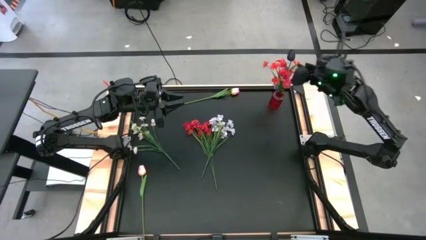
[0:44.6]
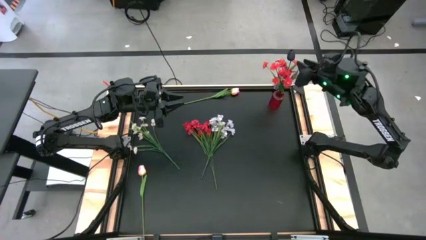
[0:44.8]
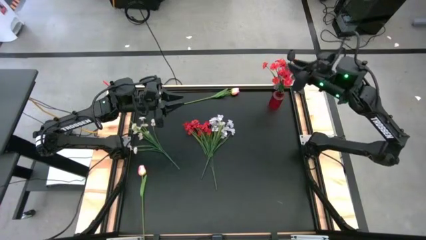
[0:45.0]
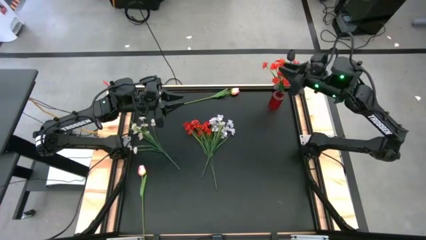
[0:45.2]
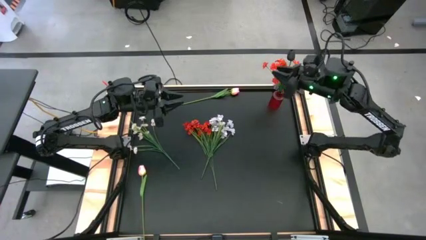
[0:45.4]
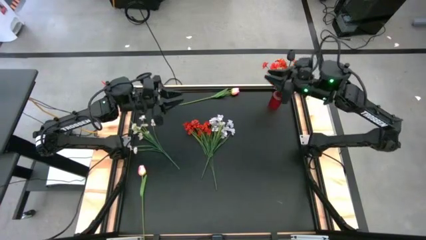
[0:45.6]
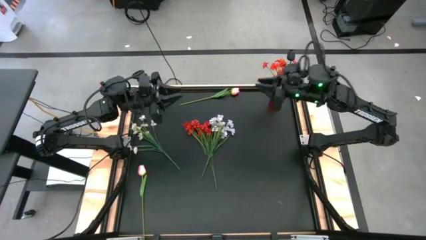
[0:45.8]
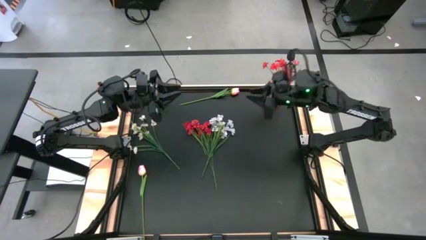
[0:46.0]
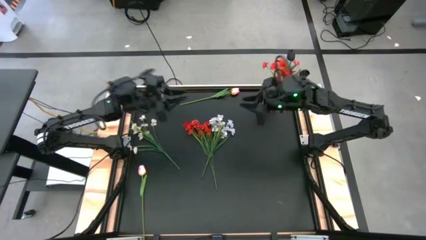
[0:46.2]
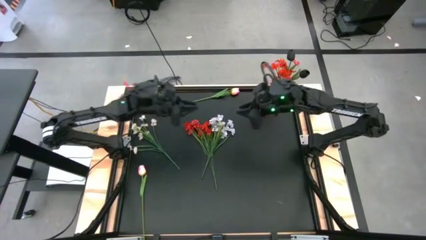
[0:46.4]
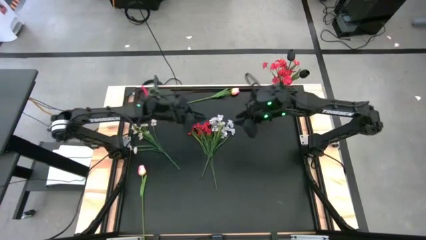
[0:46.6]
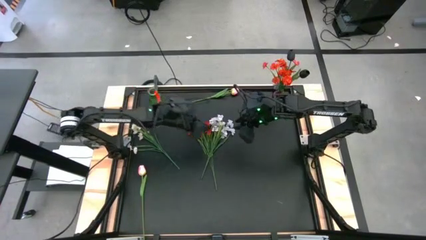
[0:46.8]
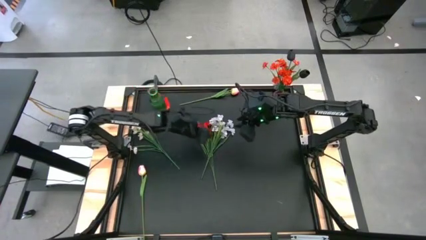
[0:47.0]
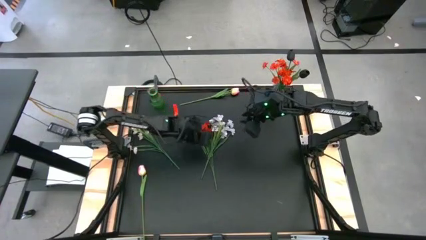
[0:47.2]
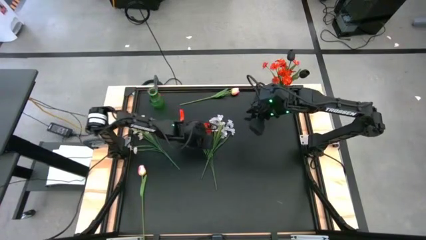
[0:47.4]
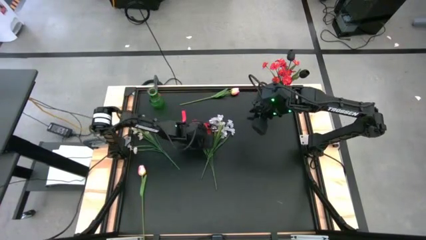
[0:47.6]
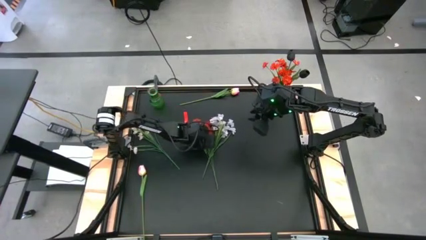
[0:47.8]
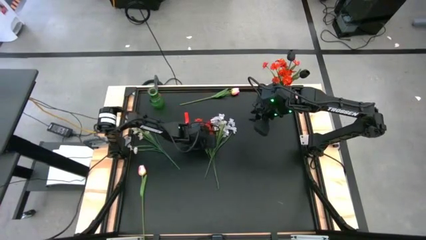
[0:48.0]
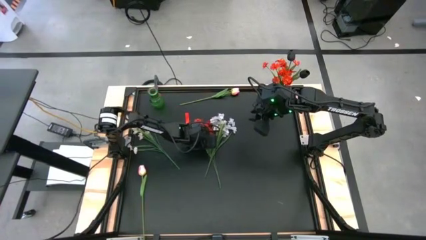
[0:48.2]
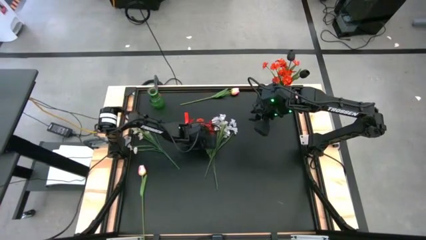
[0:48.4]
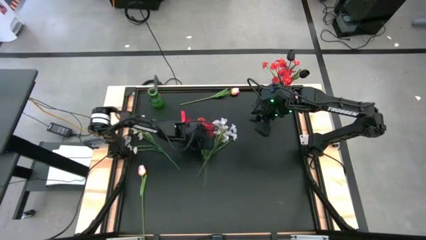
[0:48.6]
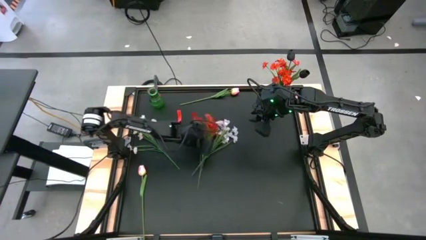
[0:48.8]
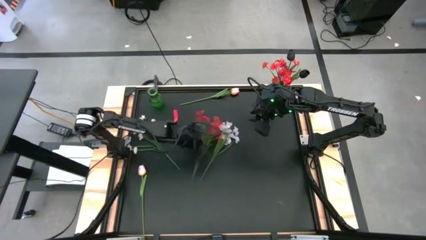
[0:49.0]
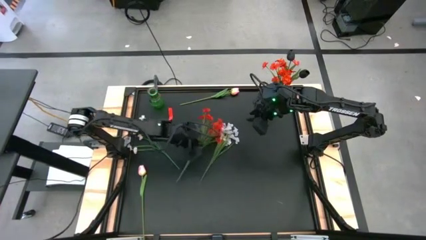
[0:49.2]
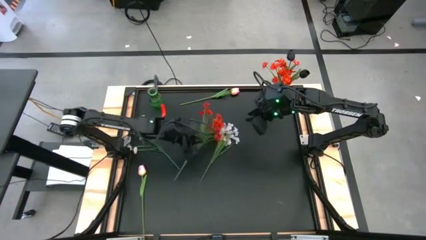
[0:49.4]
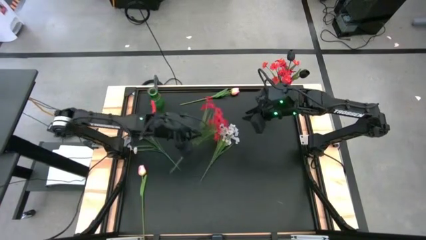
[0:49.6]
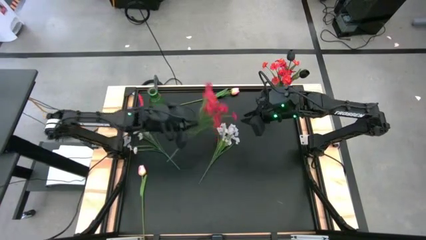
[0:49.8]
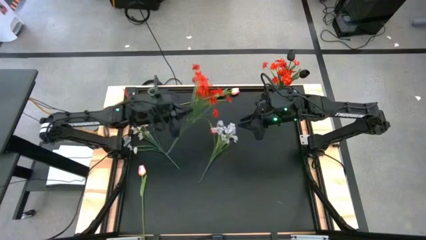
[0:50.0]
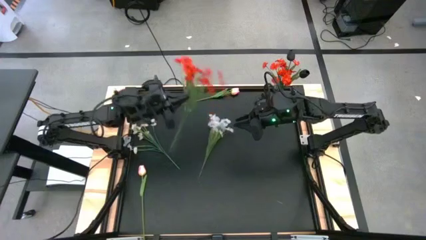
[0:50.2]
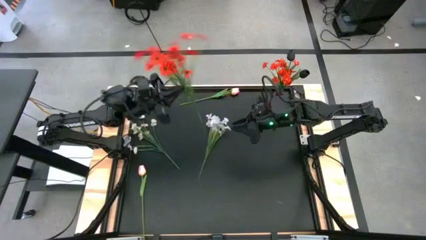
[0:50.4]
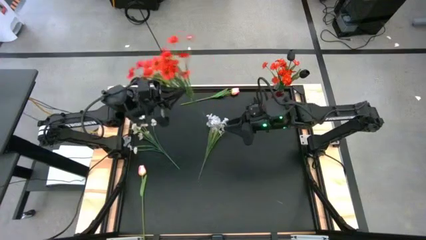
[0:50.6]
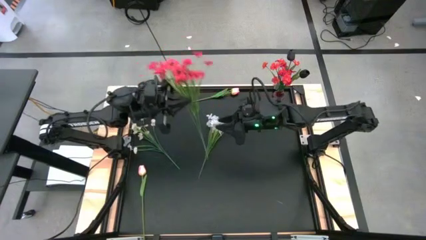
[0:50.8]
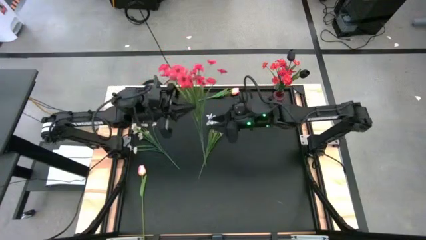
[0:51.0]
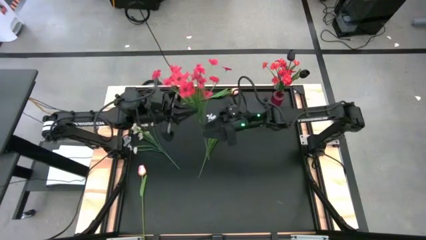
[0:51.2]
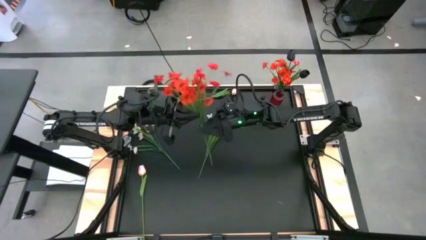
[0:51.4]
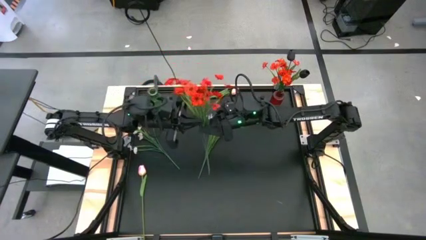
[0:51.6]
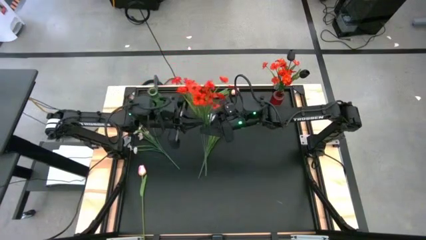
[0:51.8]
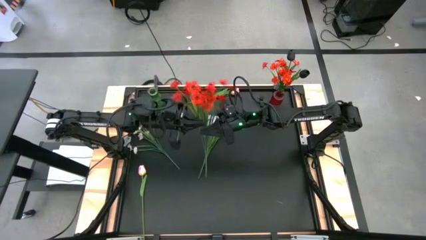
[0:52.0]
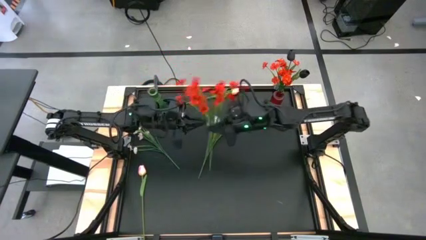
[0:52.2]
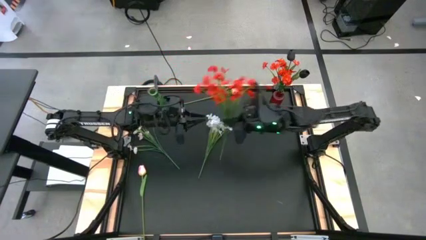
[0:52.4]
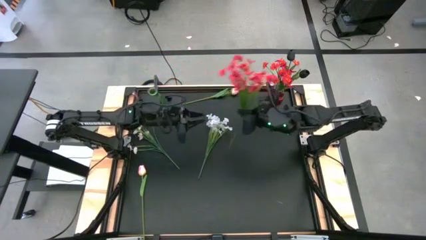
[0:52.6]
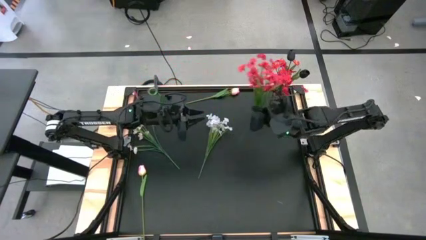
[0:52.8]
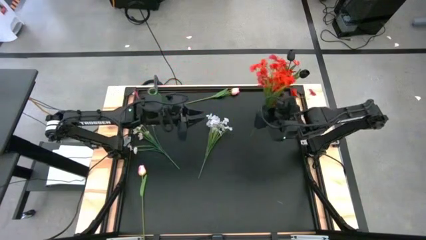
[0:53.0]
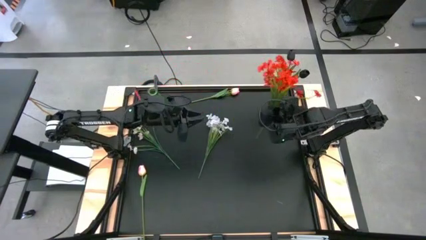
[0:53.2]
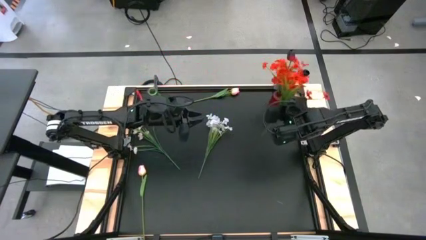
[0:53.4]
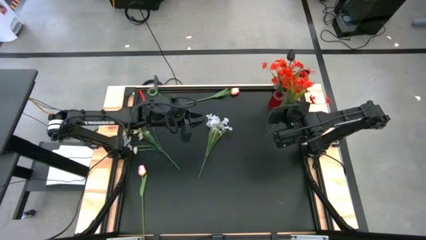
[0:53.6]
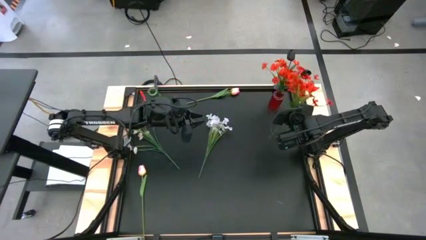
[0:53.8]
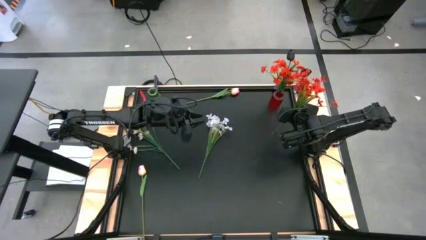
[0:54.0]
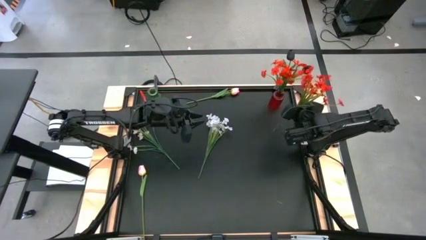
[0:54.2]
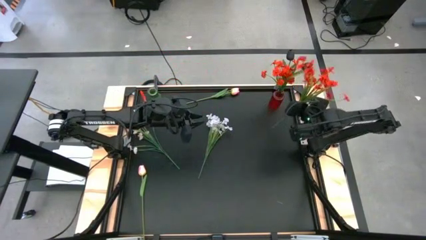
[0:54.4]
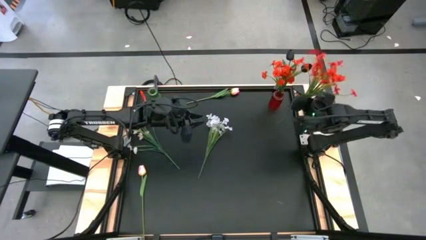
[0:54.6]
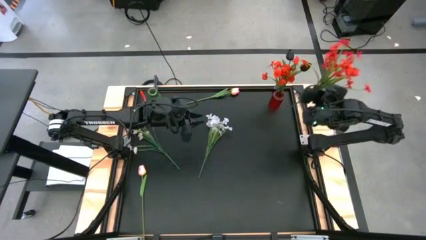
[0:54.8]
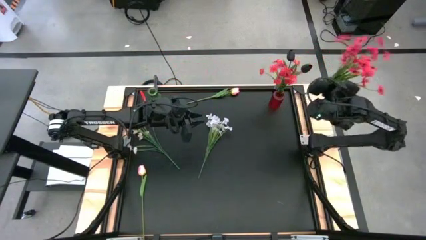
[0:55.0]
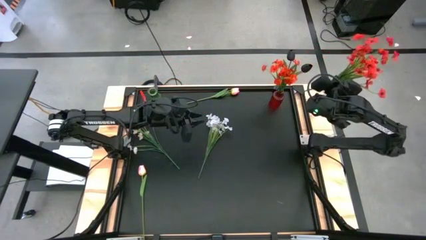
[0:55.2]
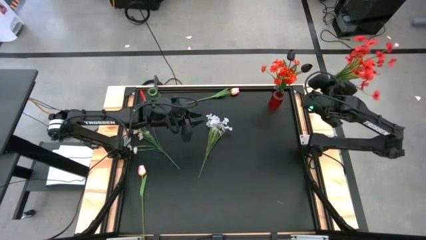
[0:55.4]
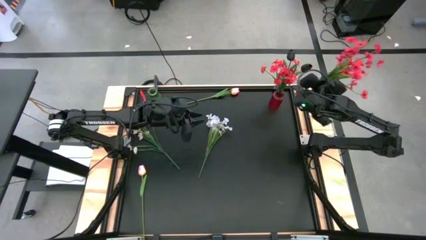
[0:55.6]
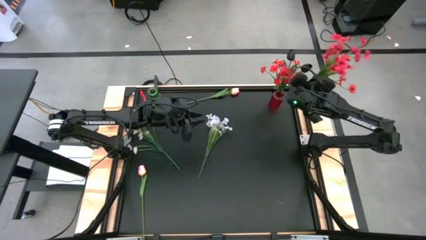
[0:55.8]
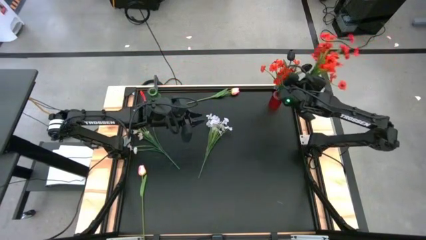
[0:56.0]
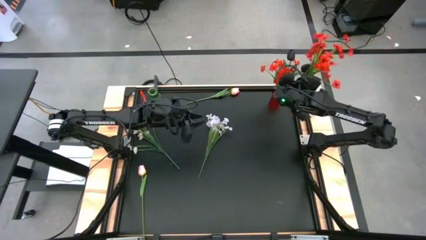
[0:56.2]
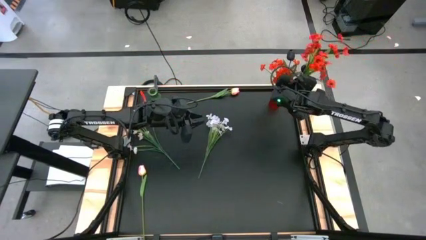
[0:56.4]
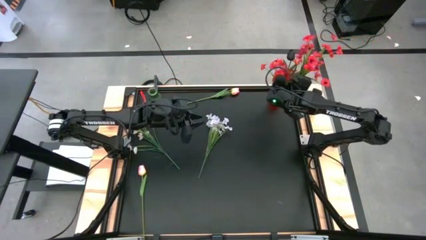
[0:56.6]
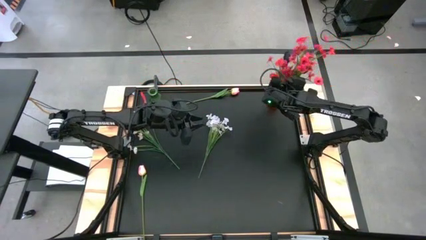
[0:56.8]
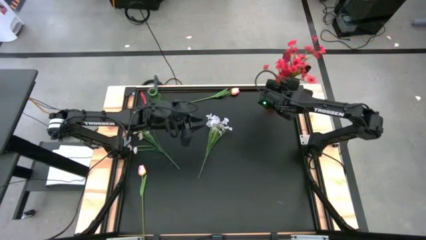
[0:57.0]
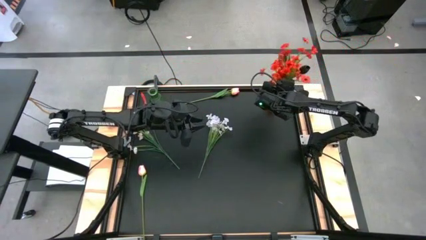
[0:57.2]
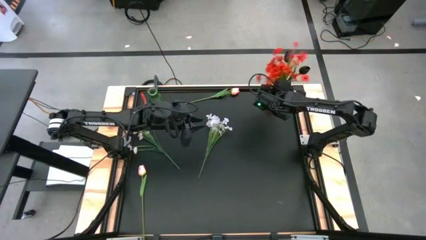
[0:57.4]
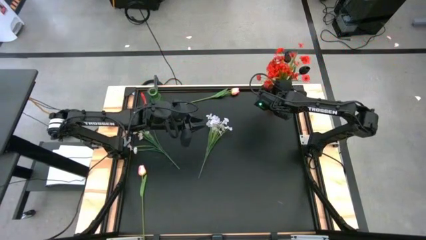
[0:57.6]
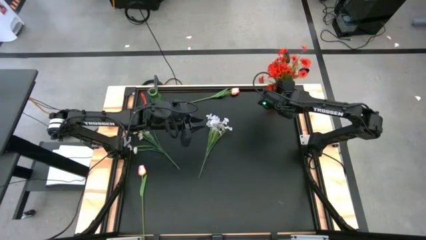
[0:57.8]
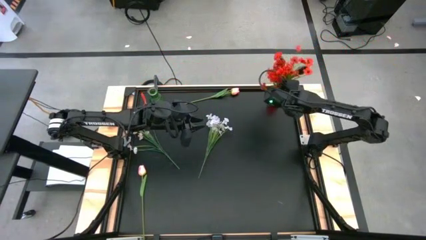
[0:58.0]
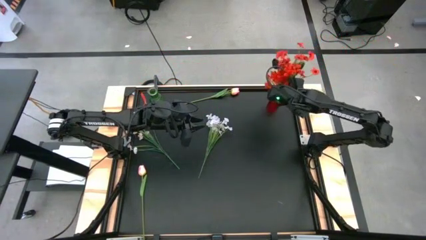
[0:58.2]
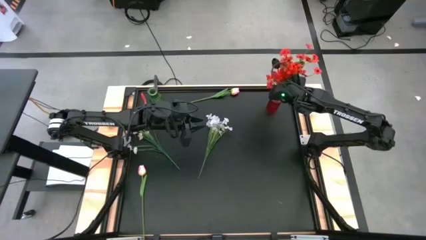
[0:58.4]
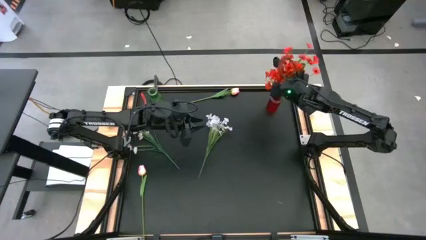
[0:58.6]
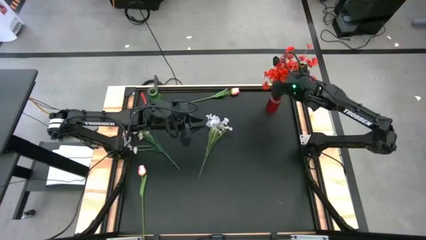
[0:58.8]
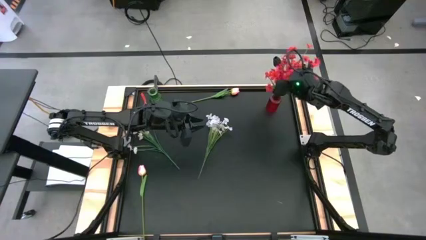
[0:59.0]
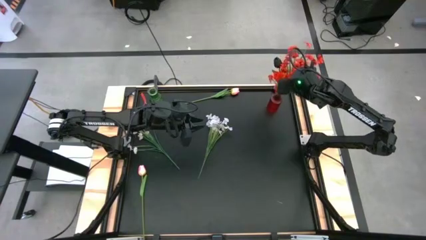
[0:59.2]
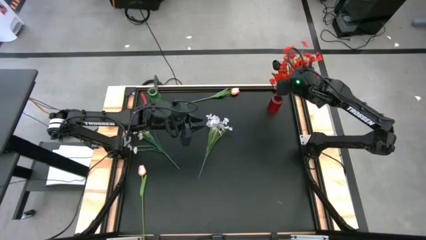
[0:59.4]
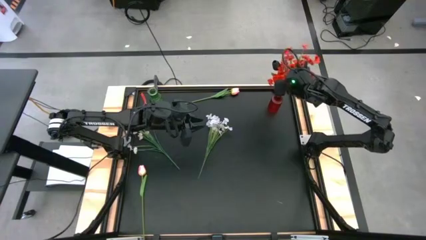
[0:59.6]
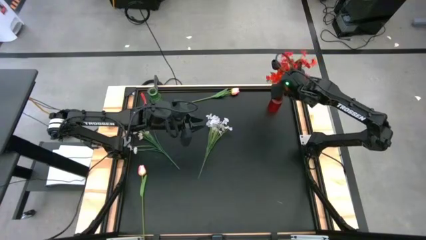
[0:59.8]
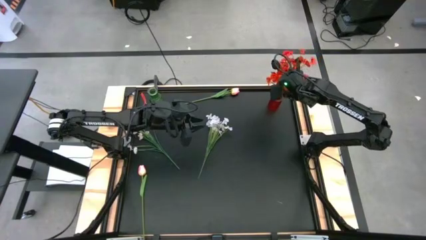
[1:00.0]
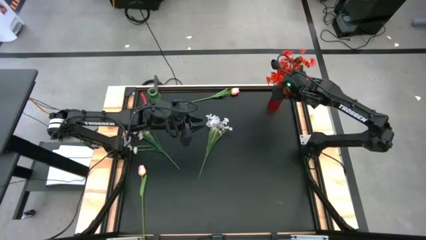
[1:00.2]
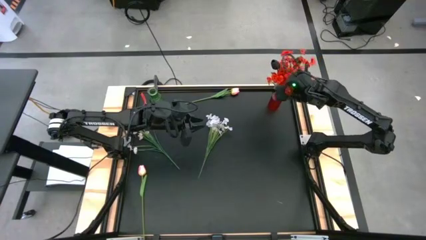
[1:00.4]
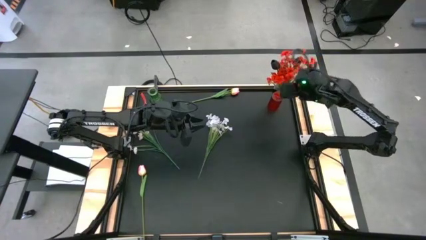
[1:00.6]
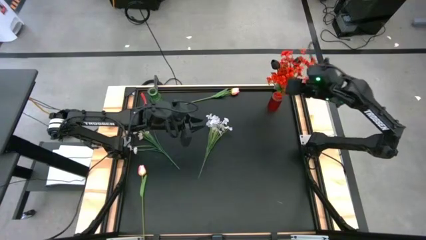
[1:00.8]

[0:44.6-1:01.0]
Task: Sort flowers into vase by color
Put the red flower into the red flower vase
